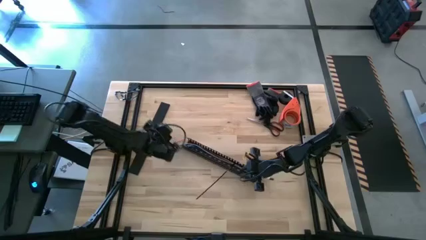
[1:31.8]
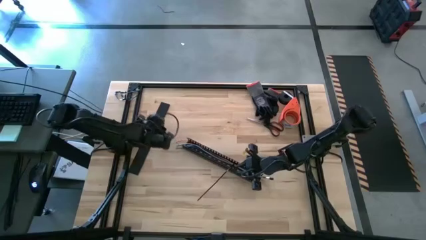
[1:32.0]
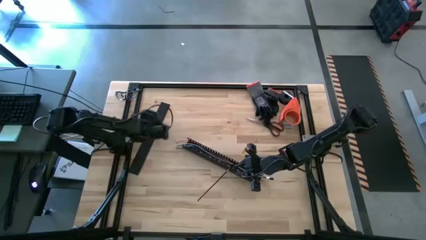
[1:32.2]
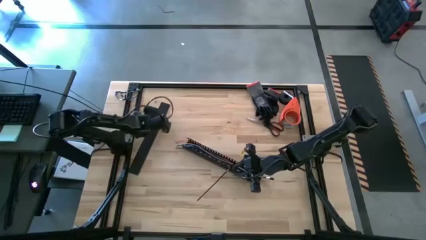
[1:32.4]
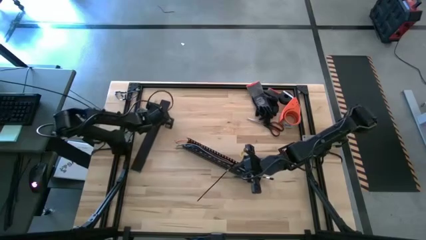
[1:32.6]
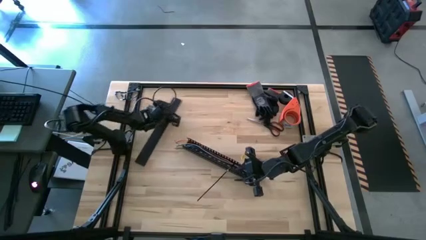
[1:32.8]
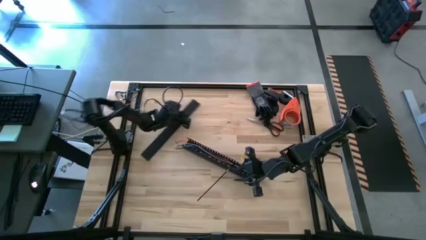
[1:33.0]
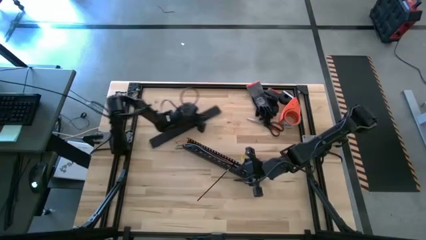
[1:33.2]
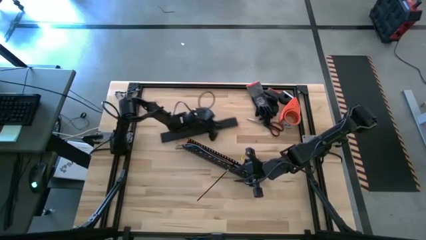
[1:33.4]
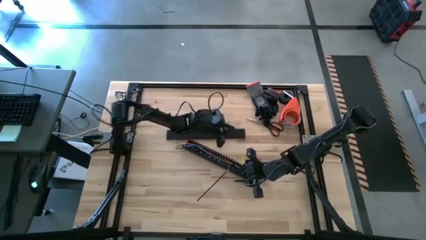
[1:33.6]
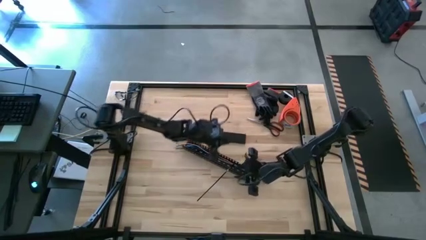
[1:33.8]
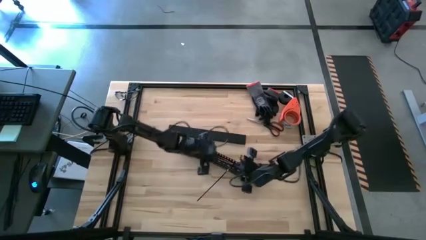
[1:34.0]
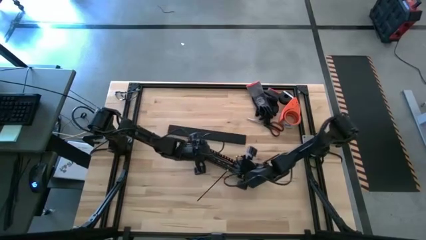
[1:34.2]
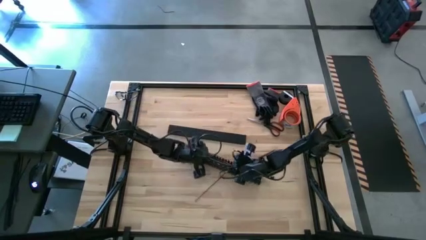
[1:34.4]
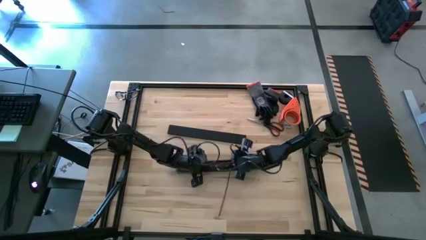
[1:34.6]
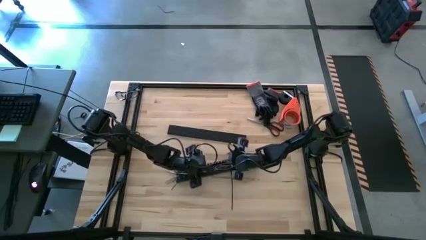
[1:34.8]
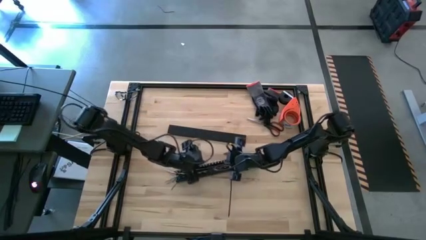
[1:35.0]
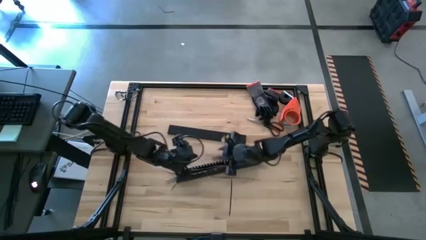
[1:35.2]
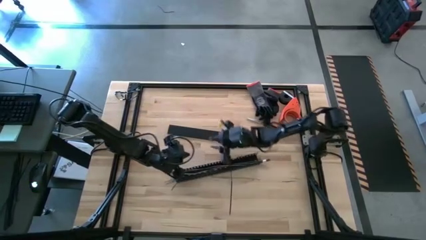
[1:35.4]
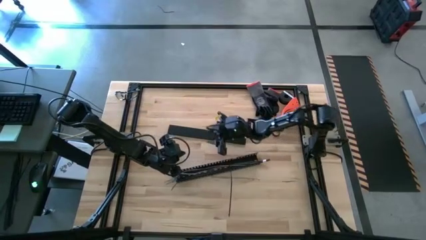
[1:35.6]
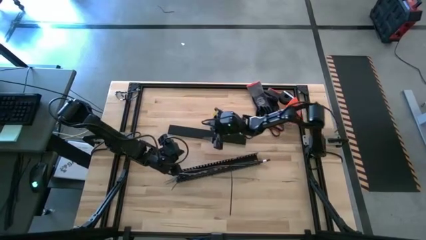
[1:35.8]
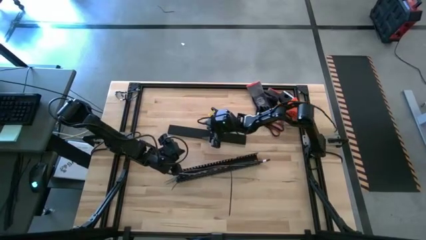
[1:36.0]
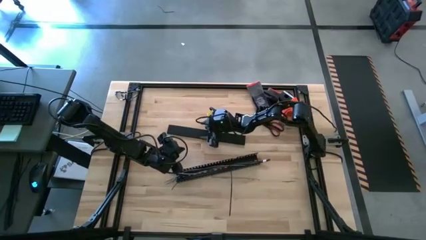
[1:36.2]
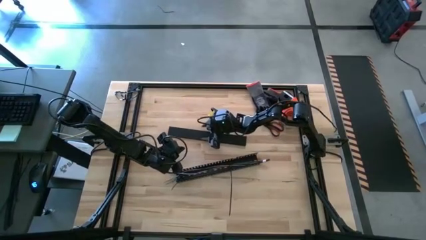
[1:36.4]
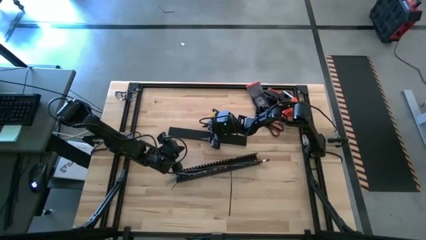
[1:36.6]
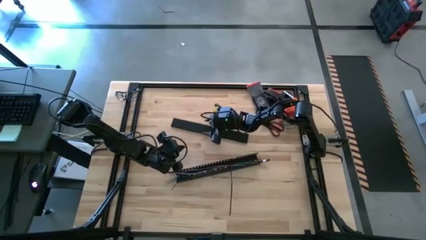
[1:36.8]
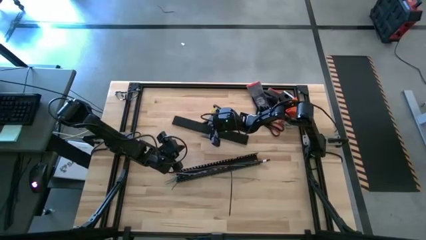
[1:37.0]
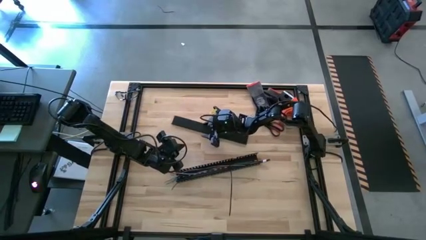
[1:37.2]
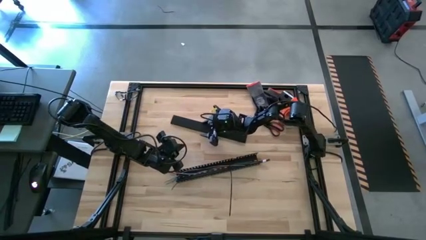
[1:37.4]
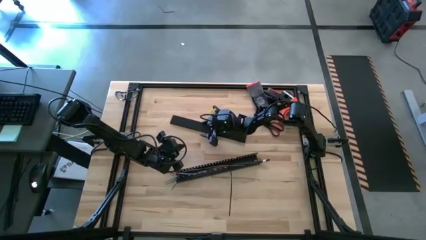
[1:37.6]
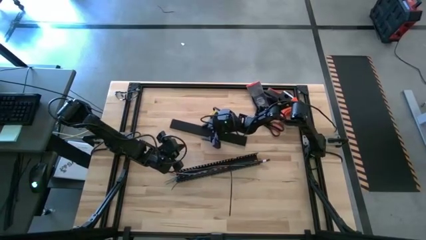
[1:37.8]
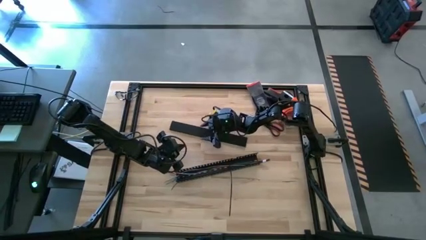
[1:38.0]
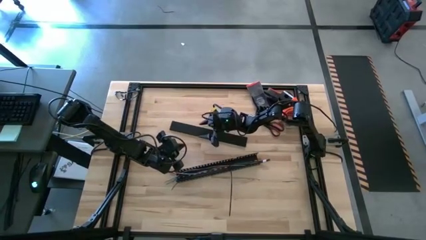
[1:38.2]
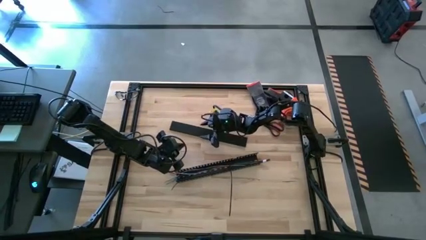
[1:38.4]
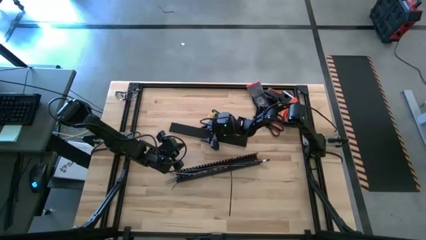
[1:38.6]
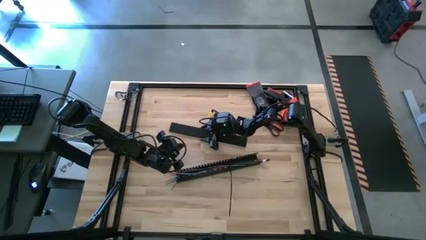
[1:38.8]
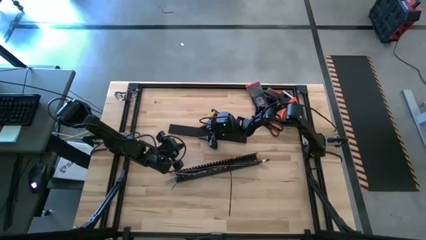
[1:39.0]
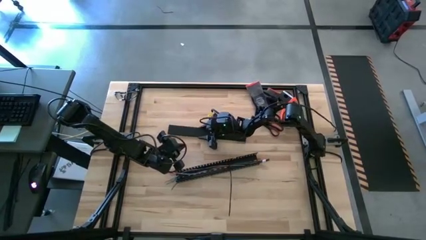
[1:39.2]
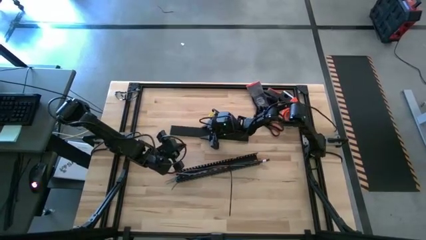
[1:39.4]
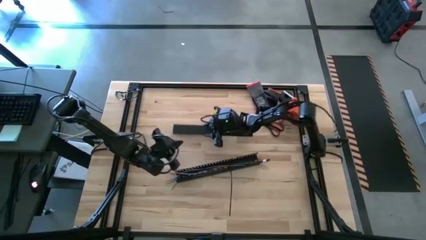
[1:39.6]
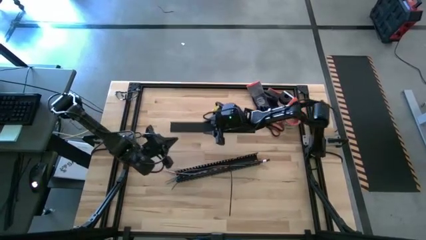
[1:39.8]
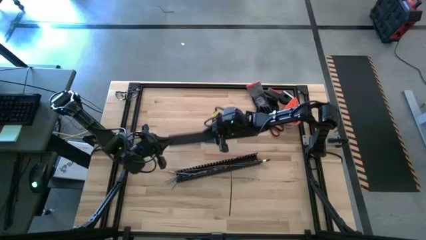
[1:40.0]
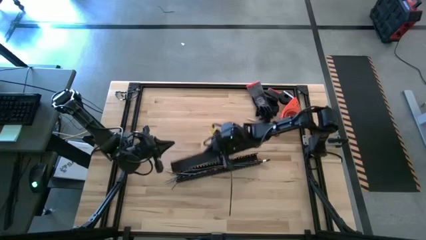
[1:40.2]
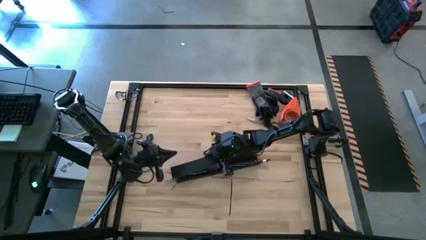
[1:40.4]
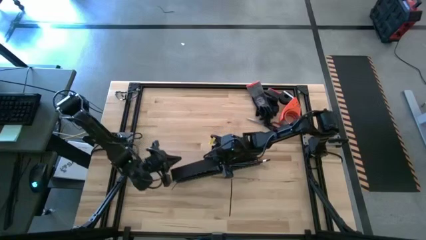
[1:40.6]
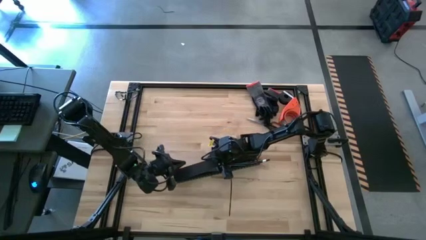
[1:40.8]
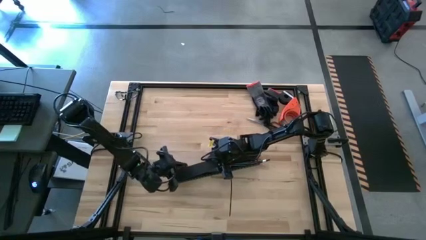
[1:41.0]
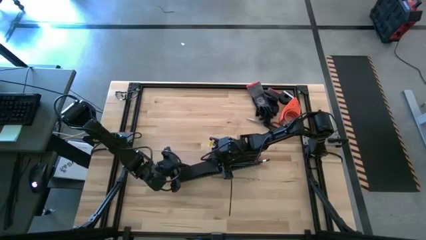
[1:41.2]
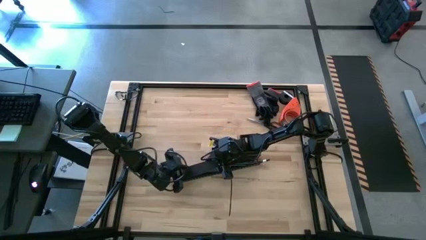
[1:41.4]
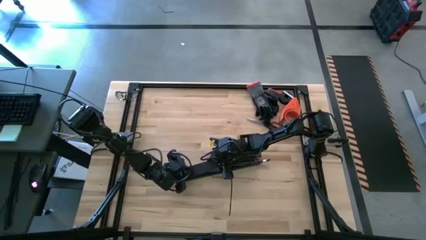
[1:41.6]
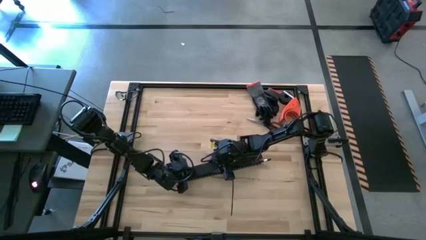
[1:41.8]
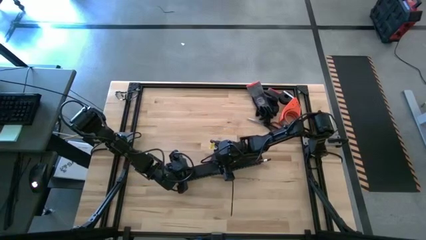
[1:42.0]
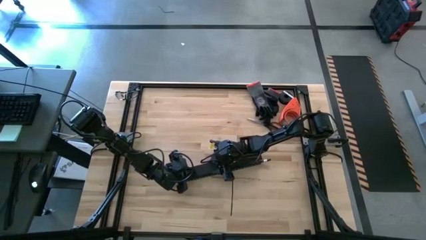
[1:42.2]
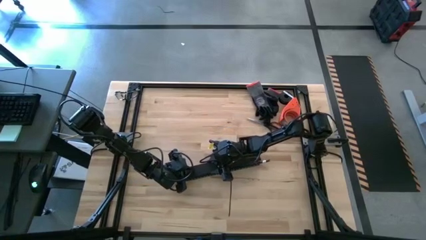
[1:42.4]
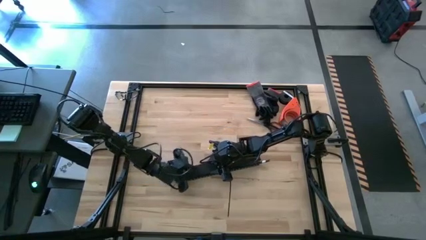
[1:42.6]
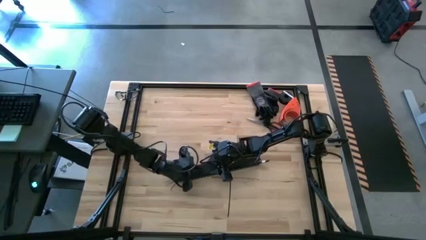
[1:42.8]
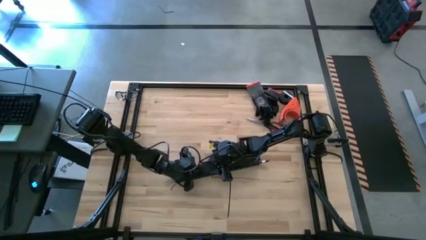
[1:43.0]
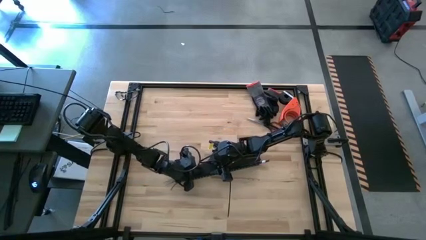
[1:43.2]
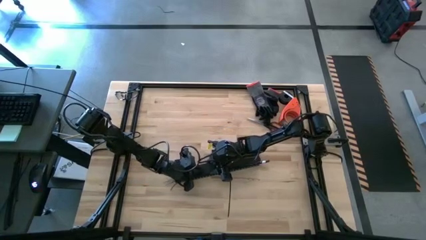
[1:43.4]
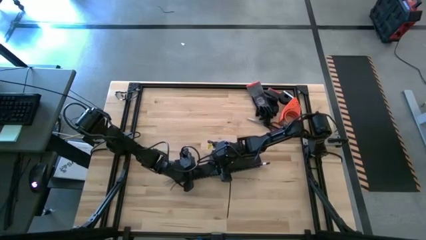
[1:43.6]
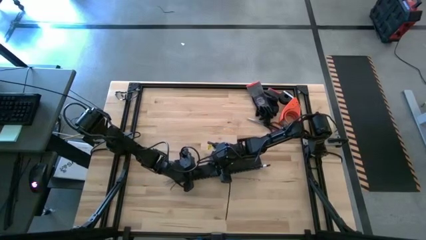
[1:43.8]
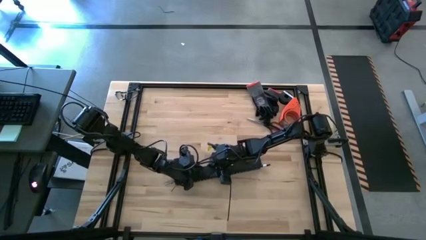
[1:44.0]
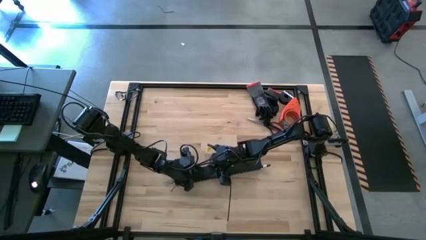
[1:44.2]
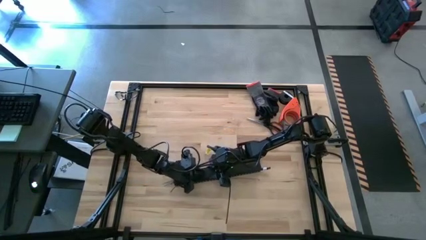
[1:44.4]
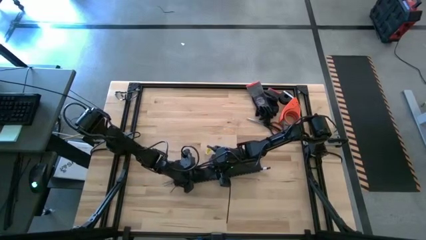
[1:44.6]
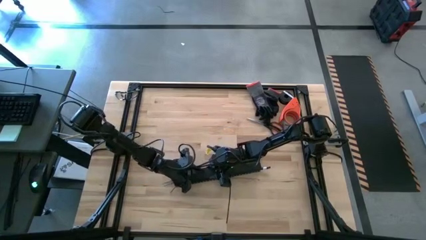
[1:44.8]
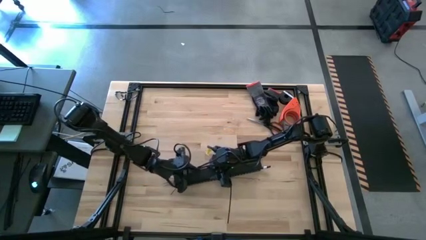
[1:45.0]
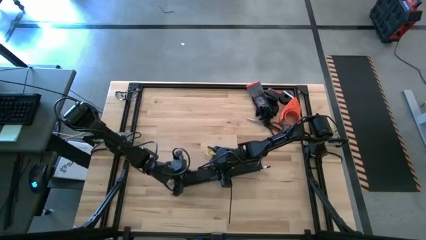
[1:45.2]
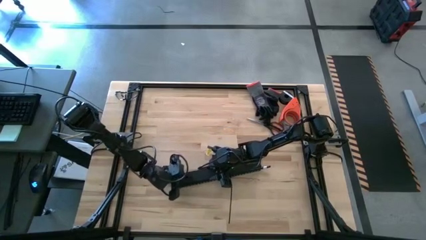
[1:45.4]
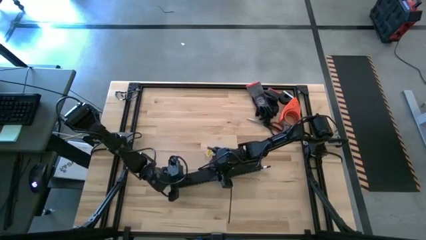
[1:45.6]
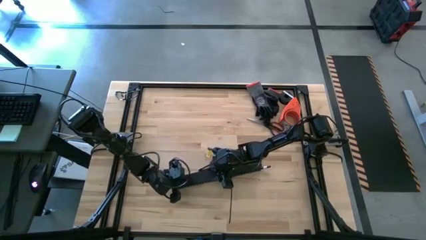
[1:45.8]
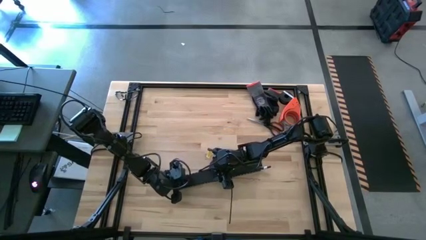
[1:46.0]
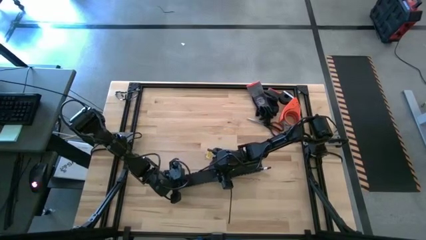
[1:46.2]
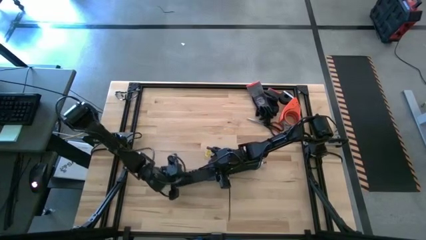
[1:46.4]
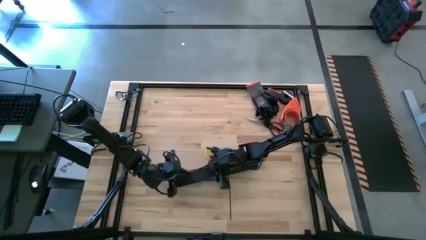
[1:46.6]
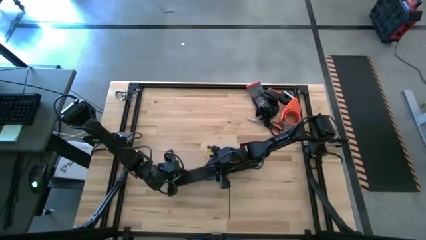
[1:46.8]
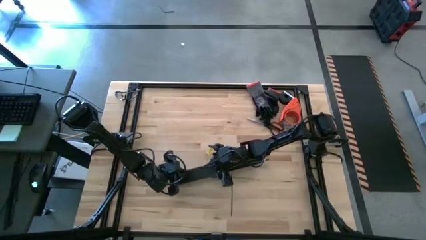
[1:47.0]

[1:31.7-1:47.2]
Task: Ziptie cables
Close the black cable duct
